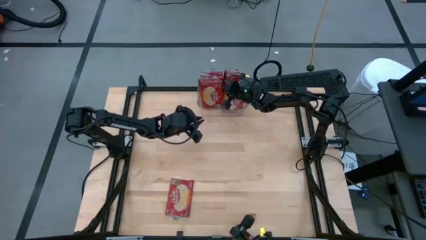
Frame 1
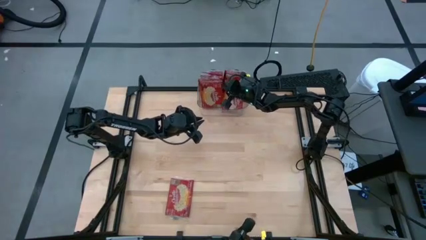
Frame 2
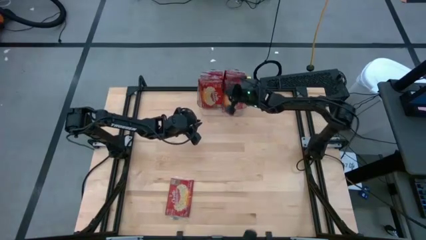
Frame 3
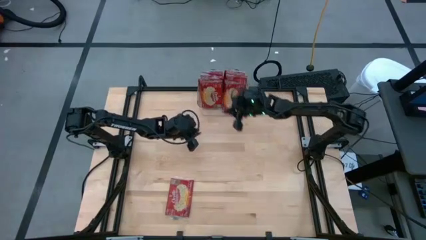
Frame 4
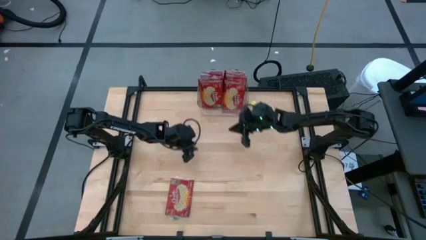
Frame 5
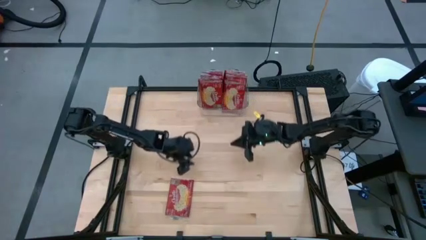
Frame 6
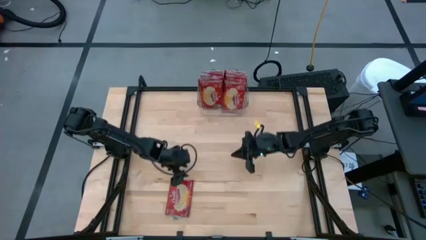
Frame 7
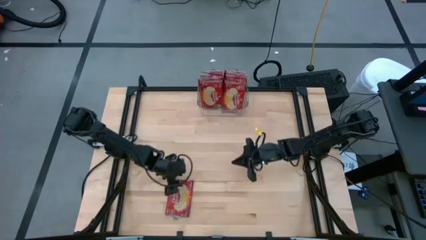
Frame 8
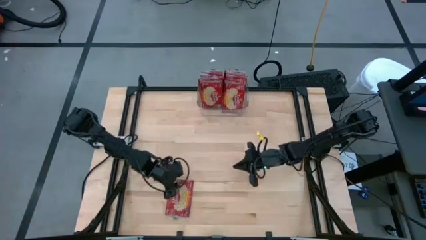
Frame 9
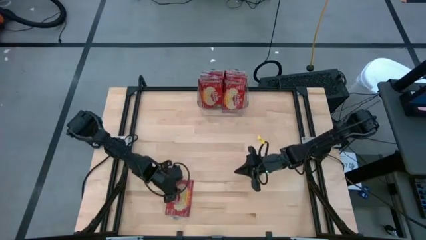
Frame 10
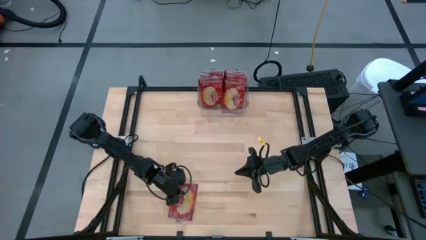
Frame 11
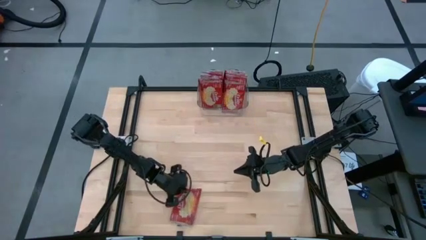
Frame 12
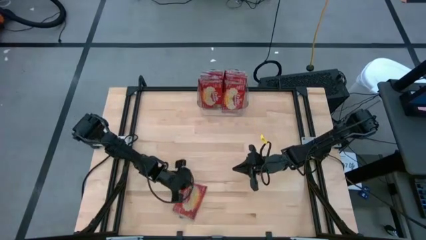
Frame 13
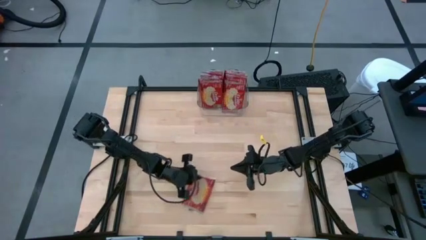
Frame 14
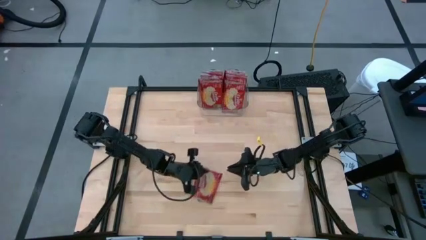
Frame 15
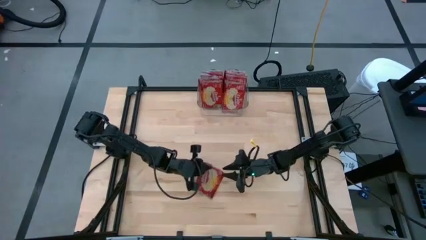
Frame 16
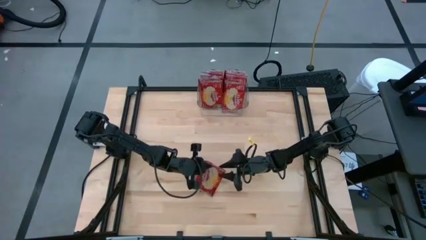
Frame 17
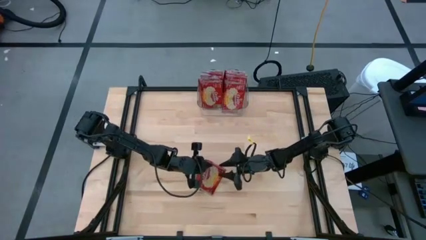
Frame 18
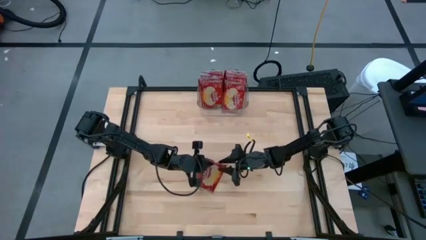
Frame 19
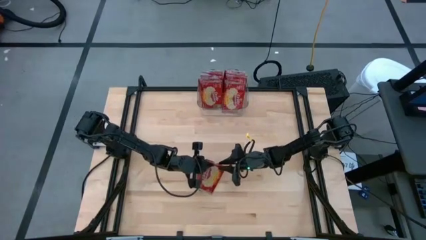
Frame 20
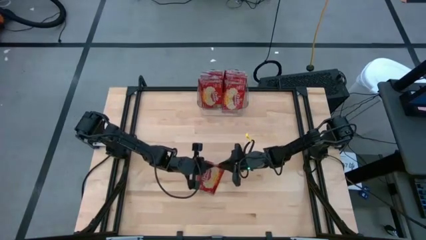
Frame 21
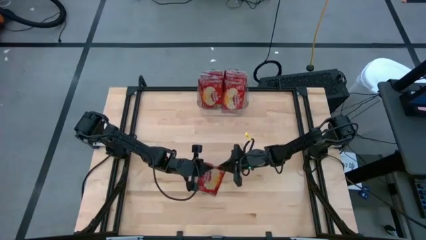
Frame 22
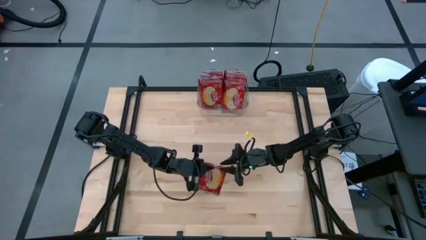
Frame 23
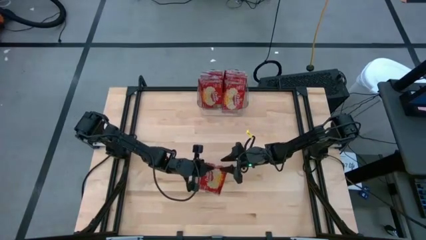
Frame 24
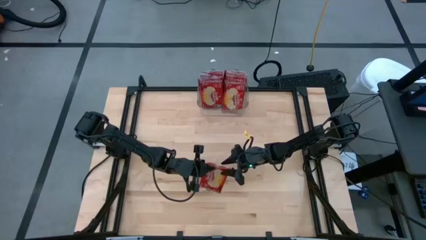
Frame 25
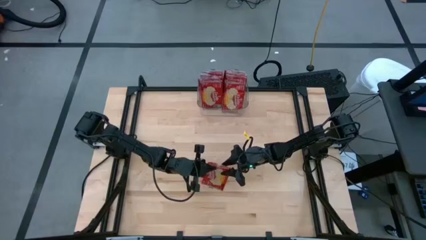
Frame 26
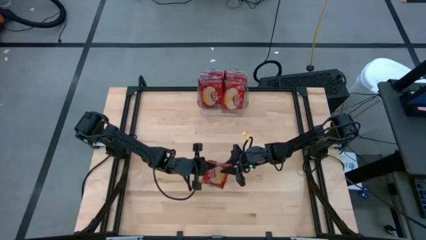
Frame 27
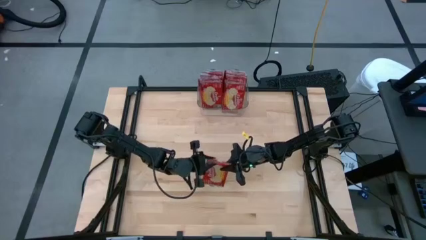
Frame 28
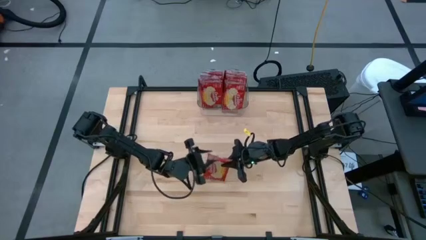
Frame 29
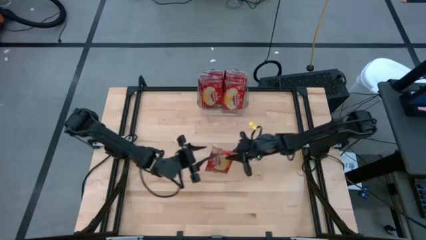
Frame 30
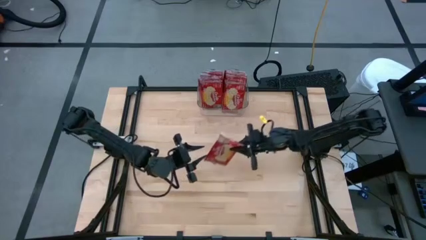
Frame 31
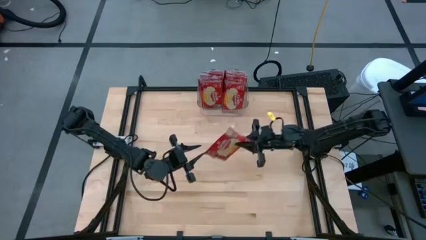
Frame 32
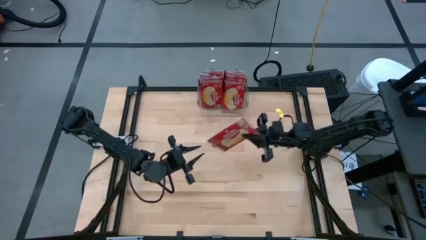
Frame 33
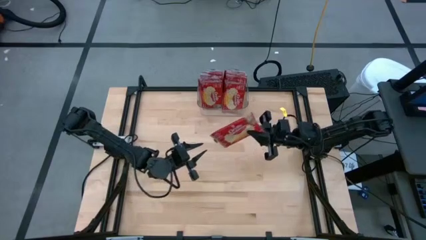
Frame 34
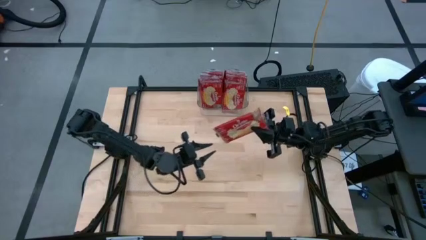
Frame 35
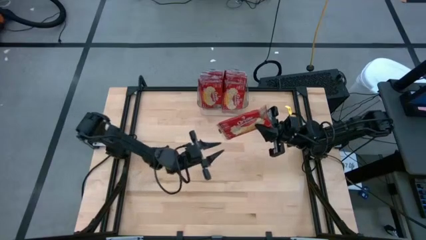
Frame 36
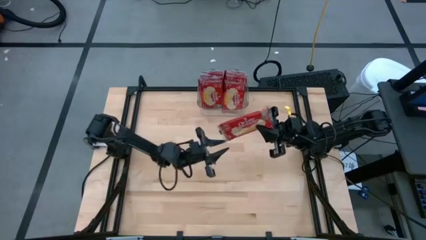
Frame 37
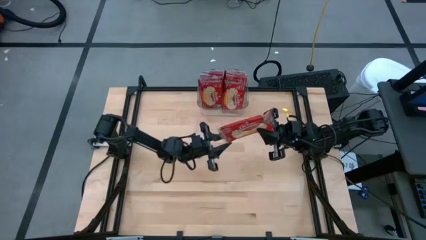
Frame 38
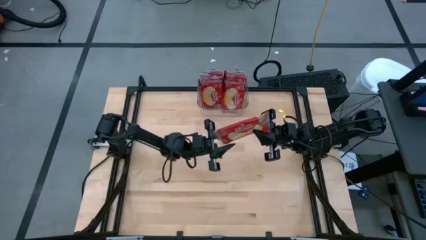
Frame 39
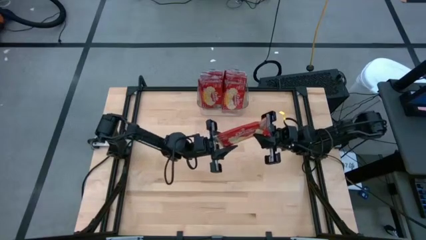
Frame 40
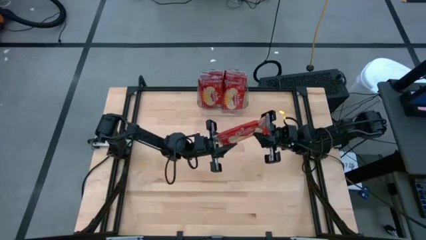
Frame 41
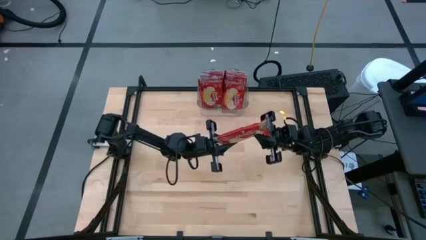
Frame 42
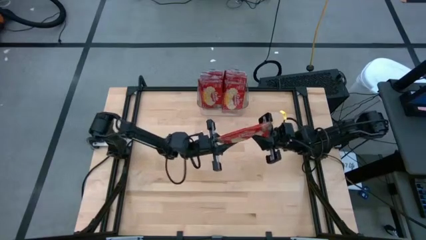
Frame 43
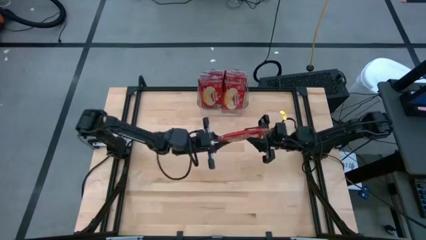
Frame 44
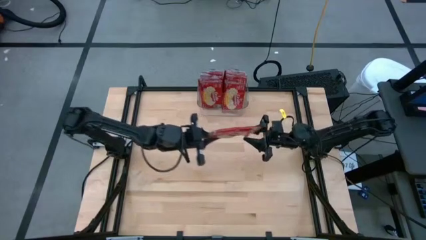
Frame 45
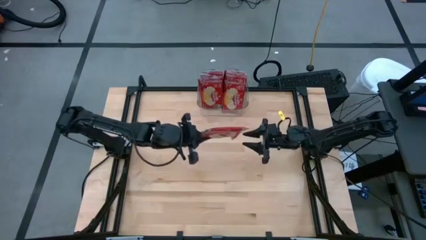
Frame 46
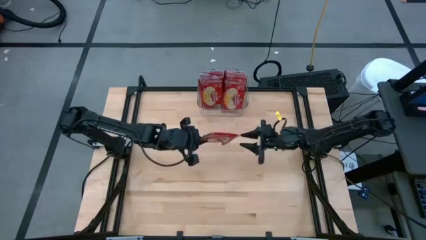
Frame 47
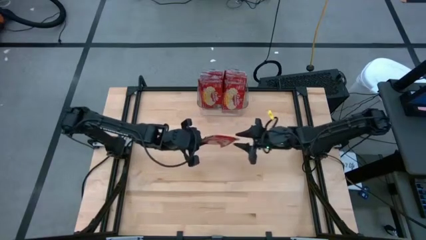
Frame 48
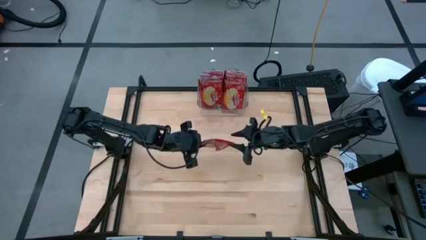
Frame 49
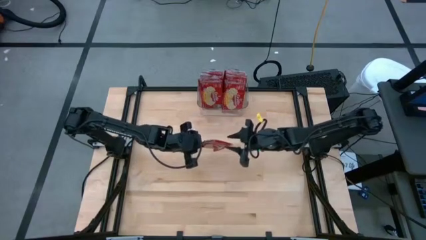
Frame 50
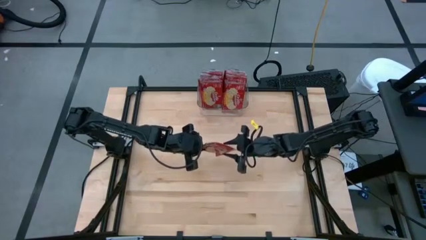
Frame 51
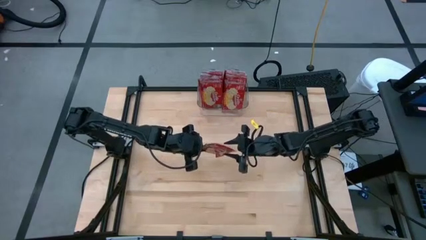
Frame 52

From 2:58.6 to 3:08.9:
Task: Sort popcorn bags into baskets
Put the red popcorn bag into the transparent bin

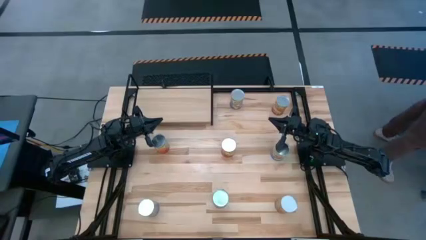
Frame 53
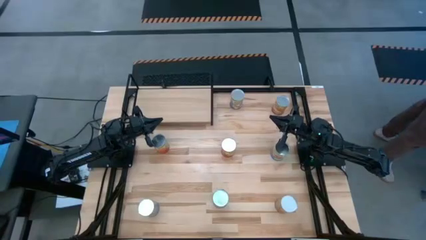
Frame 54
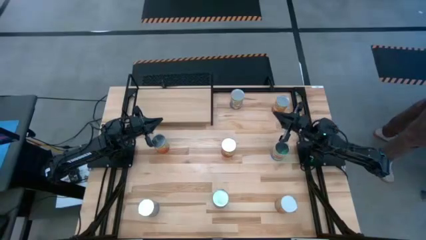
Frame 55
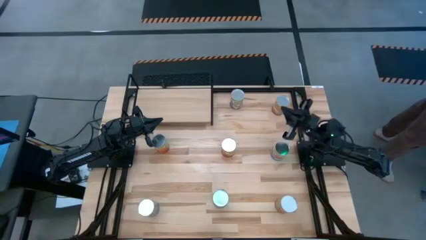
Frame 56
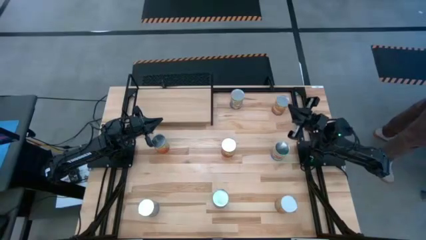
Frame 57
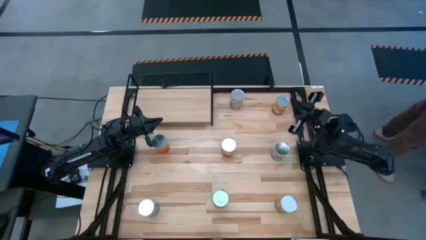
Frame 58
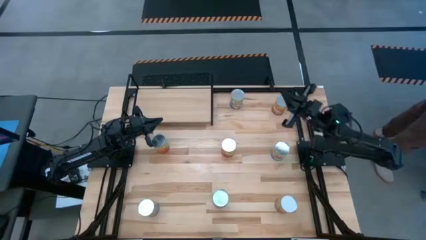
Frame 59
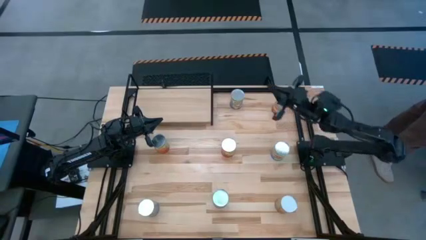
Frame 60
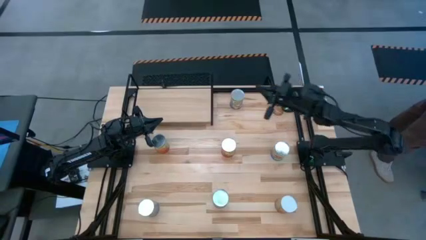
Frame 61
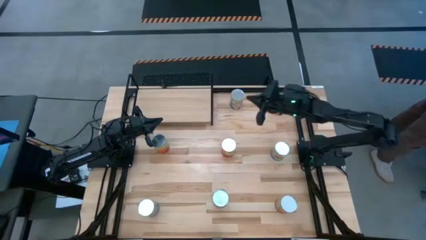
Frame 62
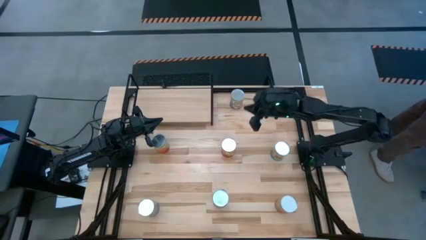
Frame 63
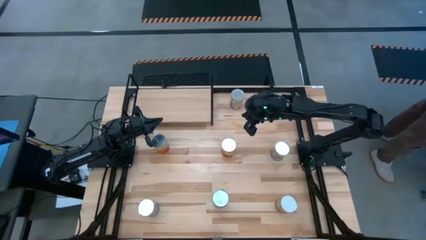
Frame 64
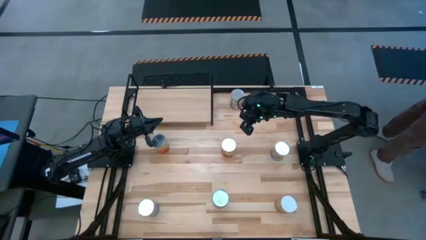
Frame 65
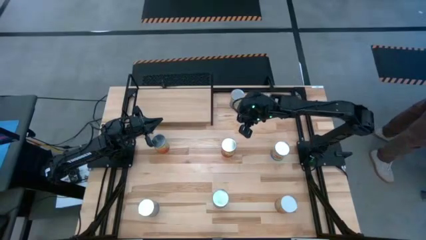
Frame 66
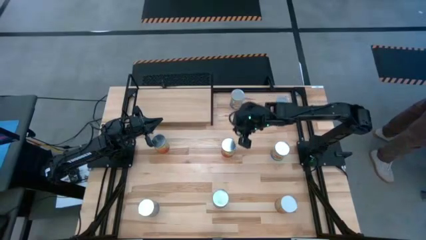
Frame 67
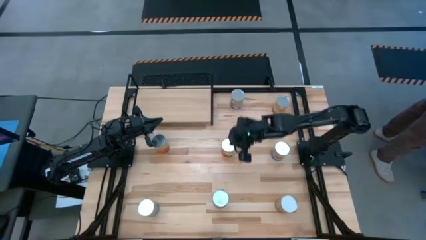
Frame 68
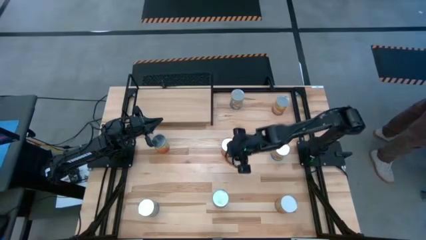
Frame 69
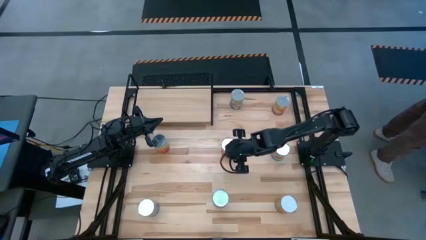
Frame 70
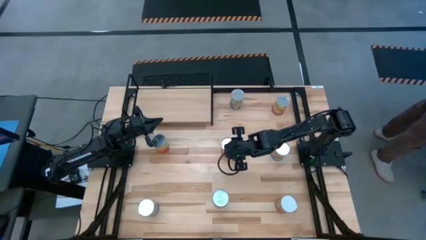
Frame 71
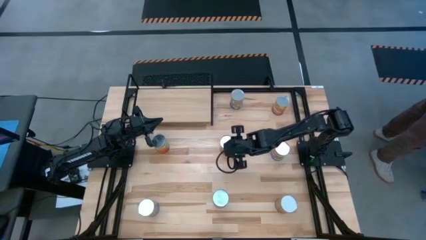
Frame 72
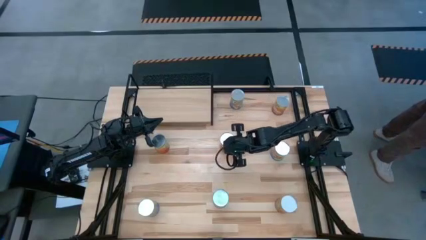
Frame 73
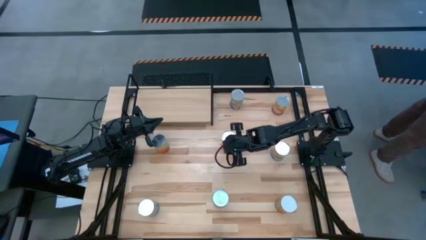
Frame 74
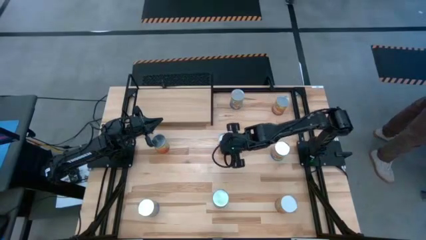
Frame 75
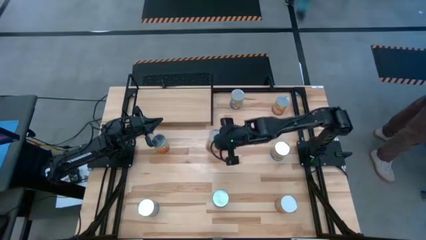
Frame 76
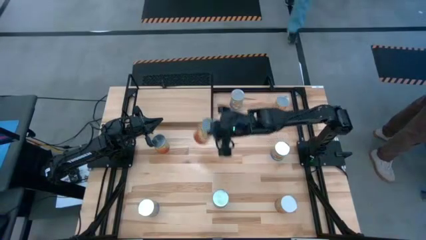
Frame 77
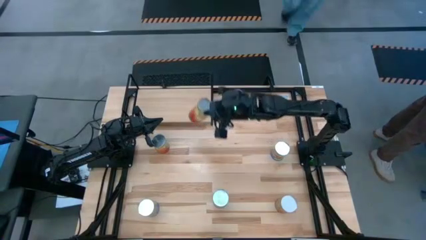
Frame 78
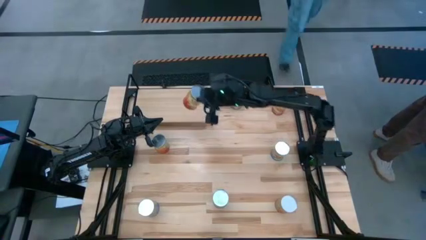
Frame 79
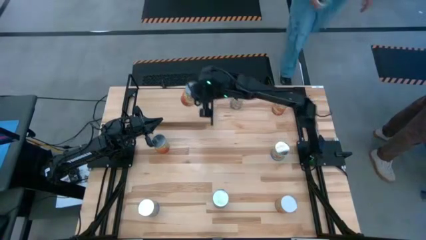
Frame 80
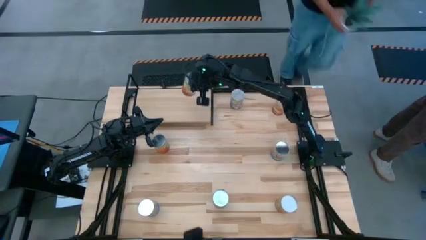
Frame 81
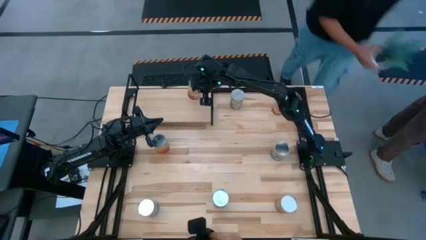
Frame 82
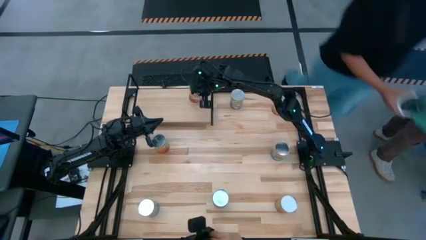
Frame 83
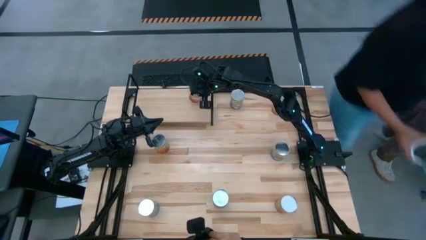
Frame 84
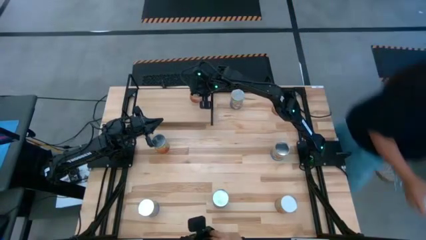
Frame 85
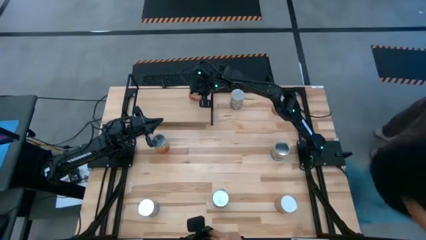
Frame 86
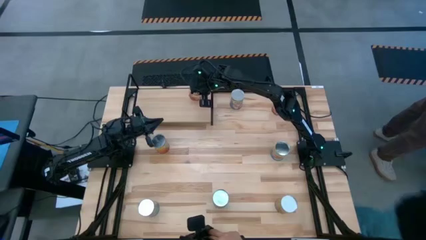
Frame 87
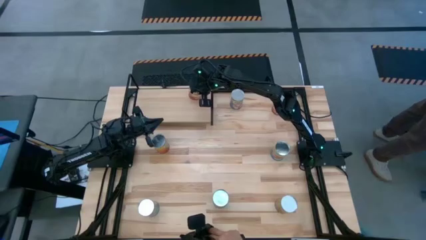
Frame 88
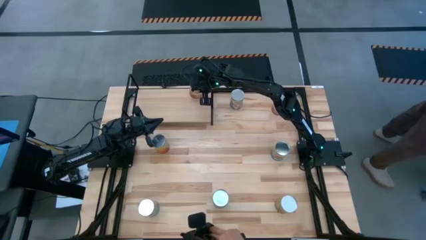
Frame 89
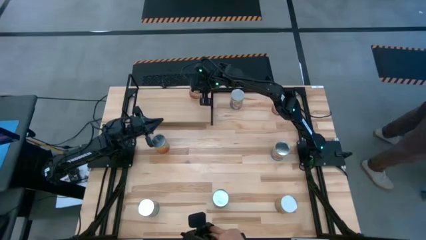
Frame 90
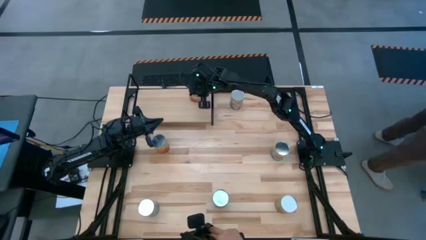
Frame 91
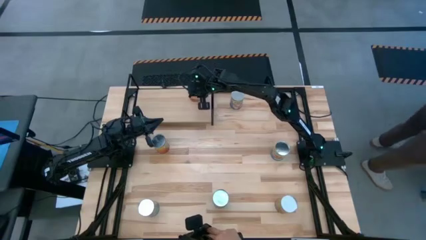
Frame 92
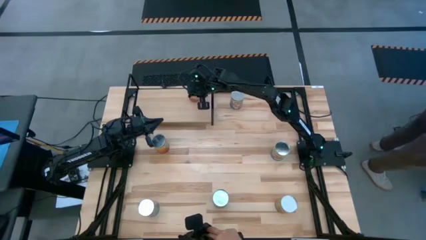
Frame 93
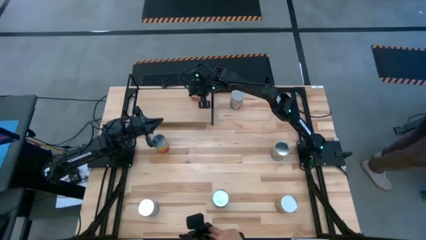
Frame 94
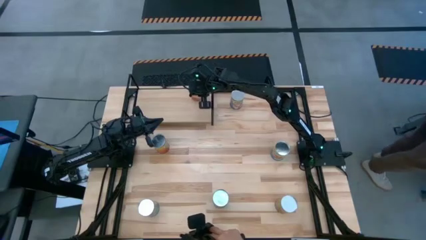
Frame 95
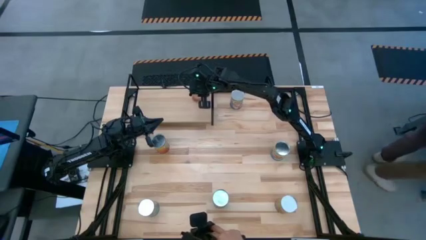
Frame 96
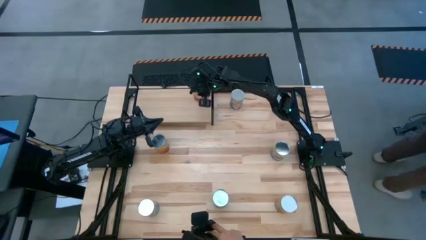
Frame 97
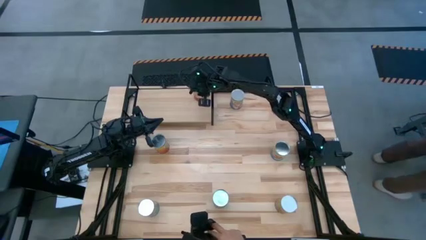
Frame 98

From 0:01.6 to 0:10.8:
Task: Pick and place cans onto a shelf
Put the bottom canned corn on the shelf
